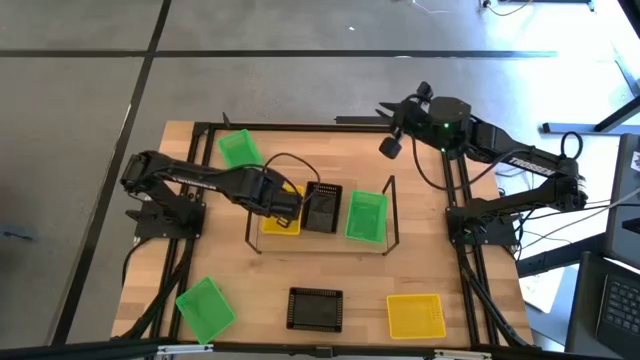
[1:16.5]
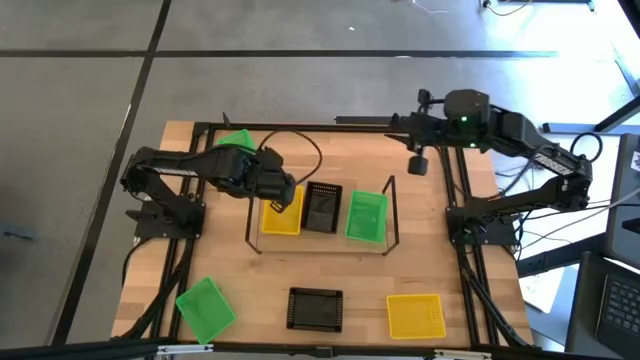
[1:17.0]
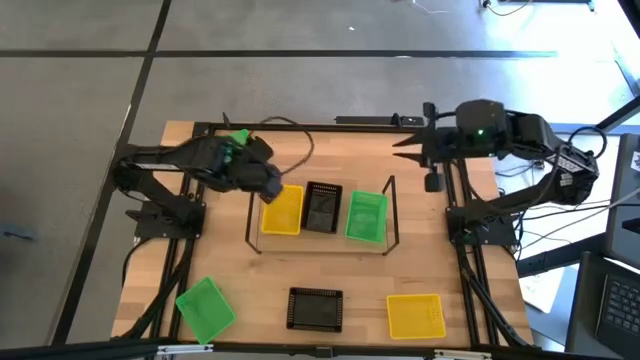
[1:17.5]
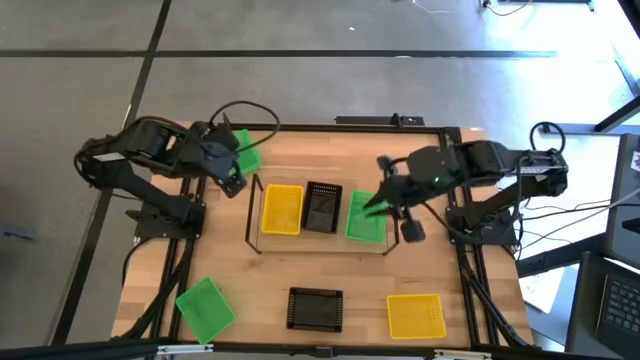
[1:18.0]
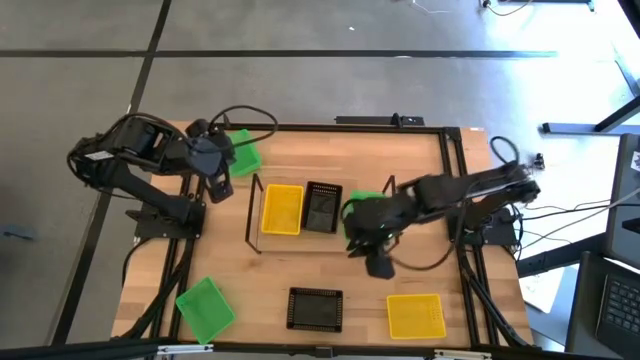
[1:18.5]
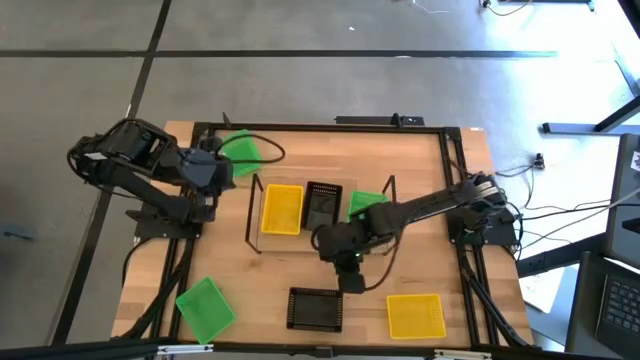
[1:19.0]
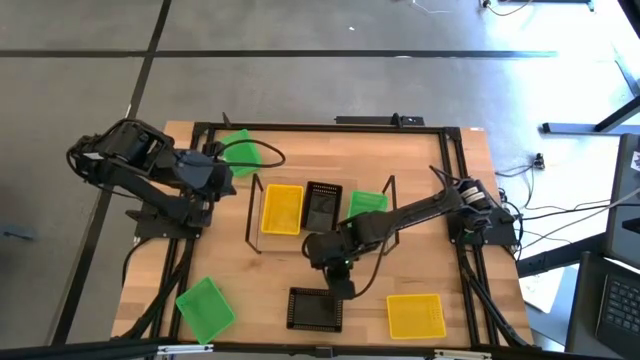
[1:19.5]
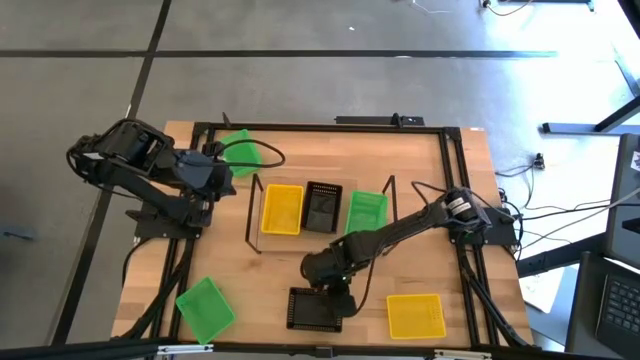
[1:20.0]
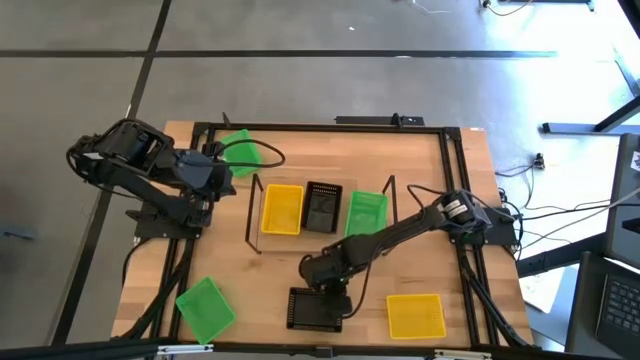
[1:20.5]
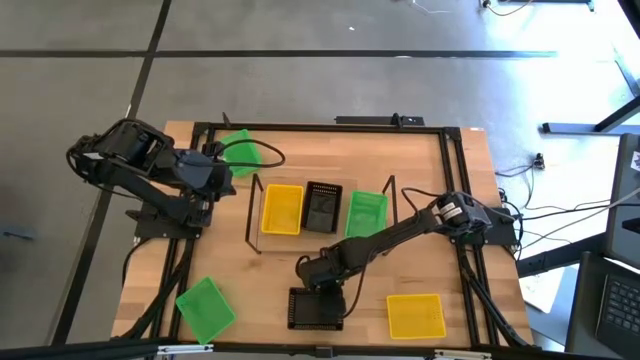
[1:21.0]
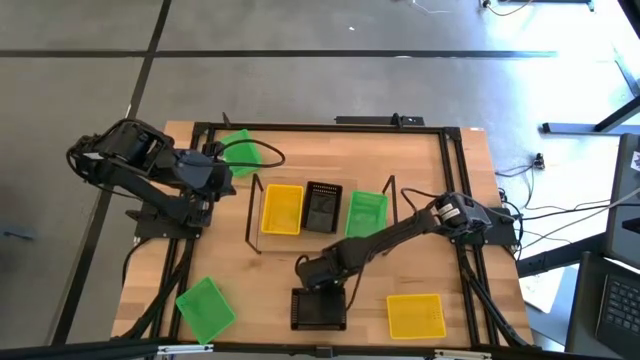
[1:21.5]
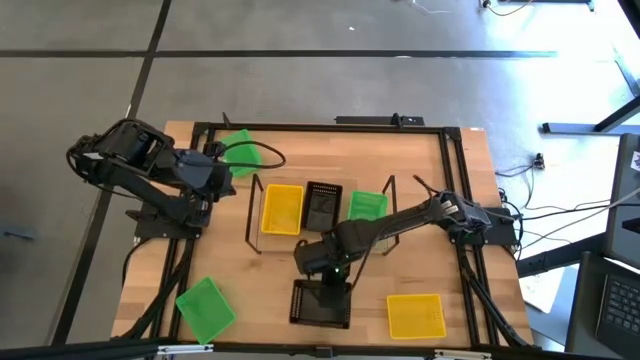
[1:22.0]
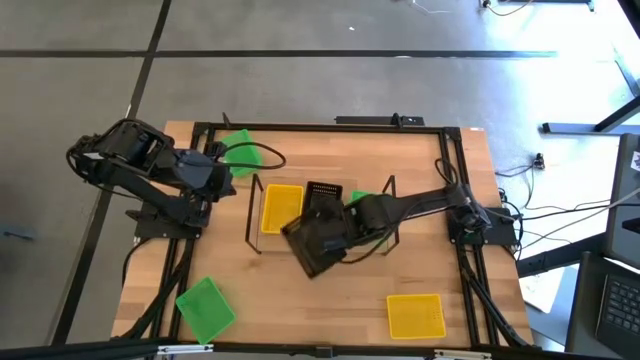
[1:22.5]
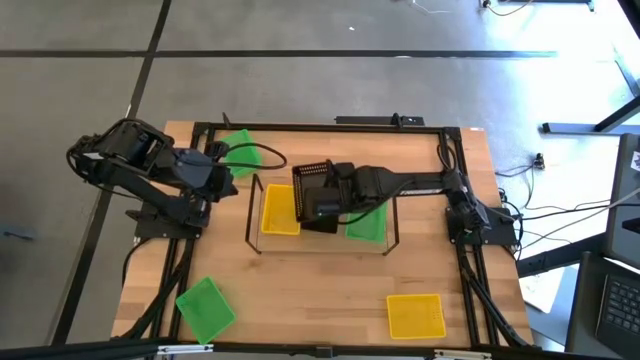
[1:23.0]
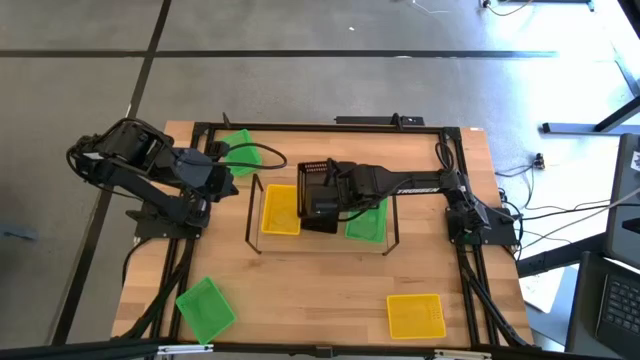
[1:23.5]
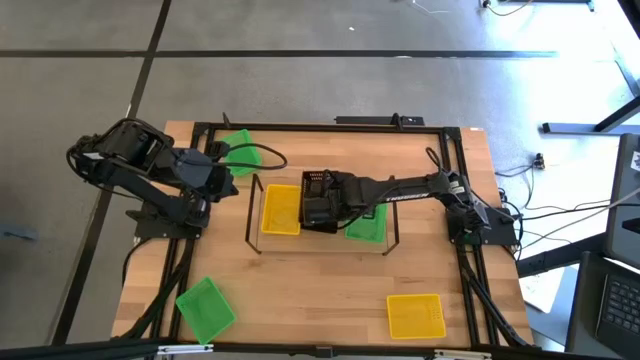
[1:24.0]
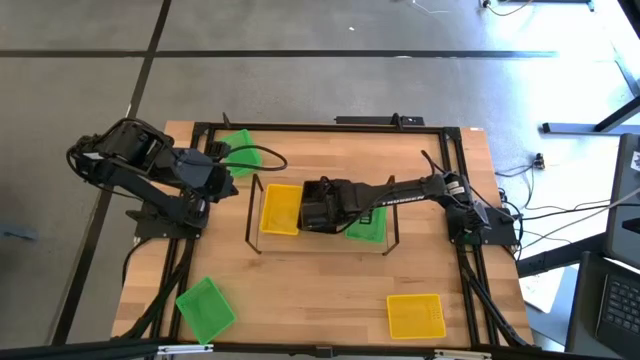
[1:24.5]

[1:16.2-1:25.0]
Task: Stack baskets on shelf by color
Stack the black bin on top of the black bin on the shelf

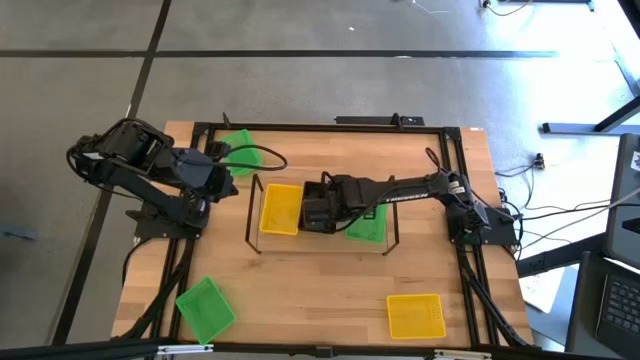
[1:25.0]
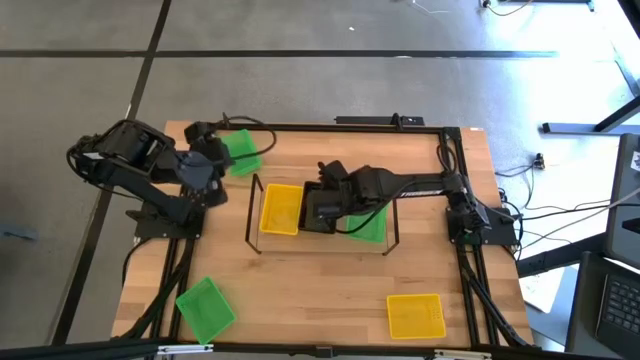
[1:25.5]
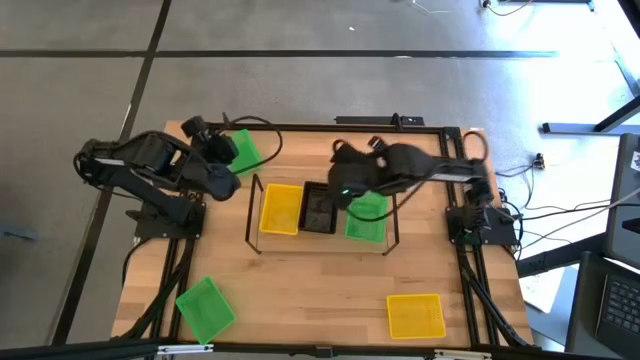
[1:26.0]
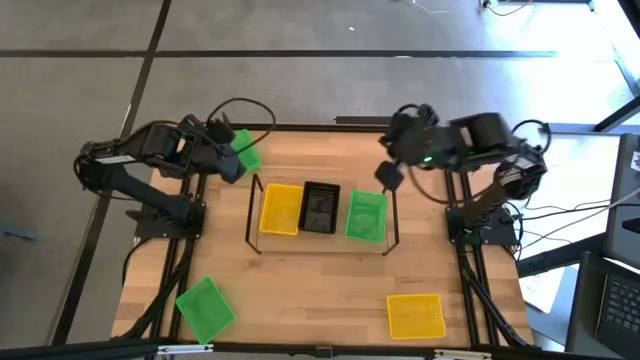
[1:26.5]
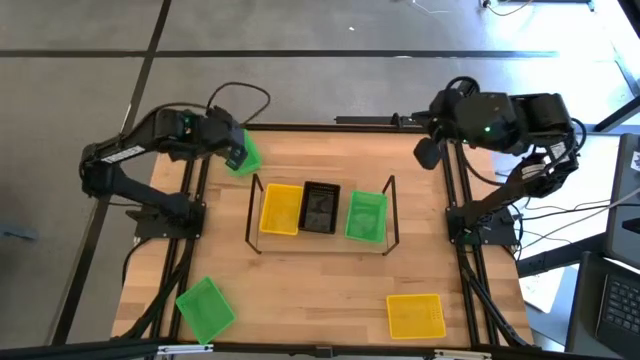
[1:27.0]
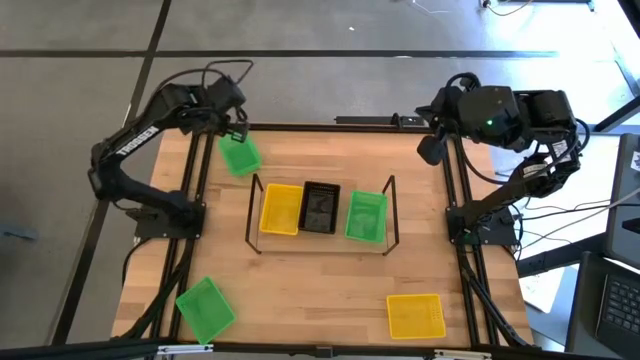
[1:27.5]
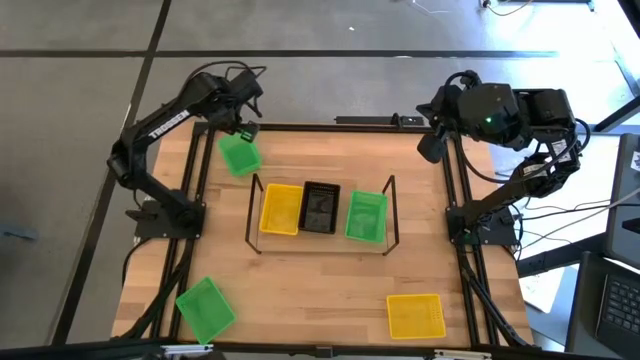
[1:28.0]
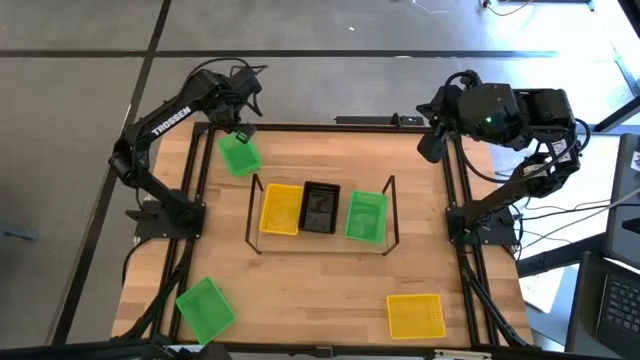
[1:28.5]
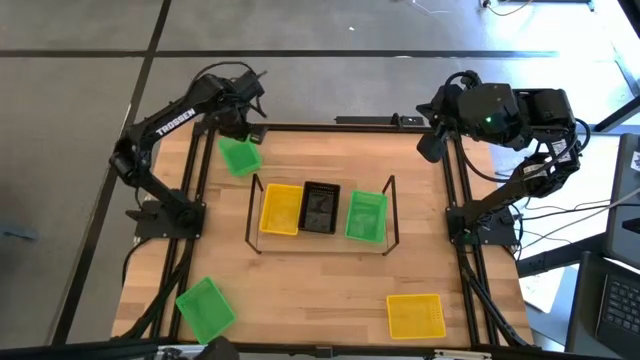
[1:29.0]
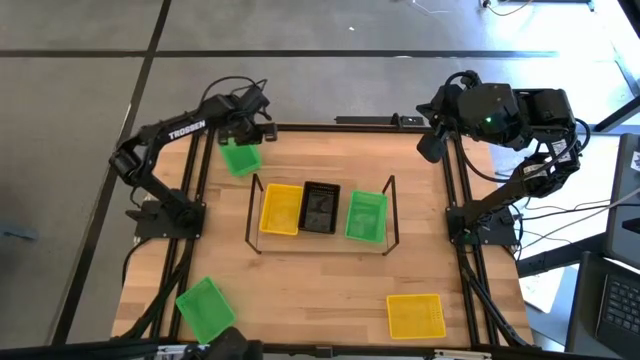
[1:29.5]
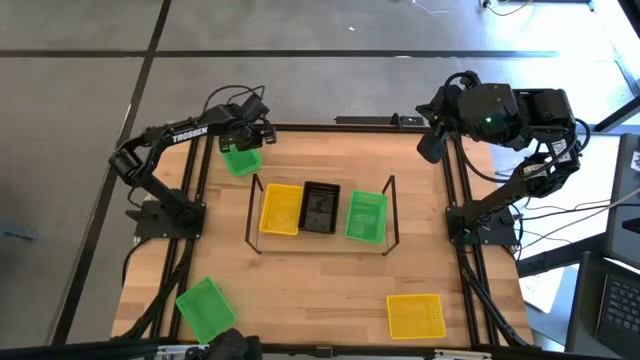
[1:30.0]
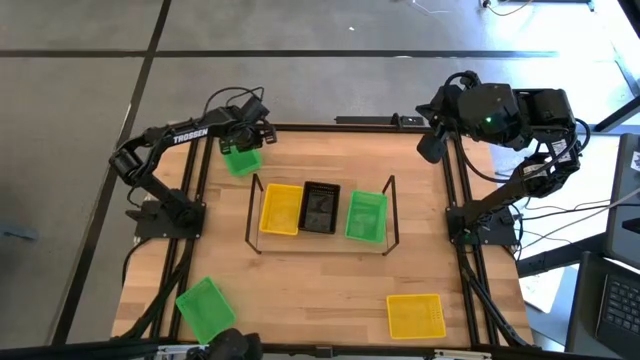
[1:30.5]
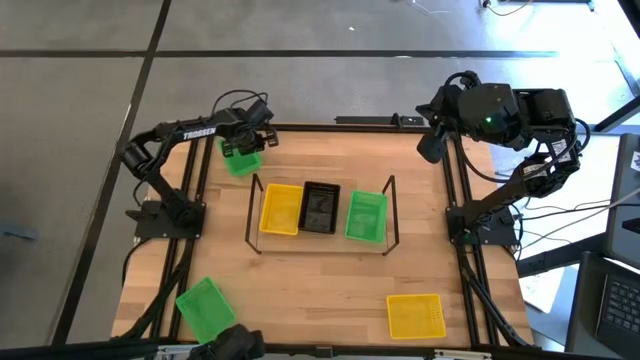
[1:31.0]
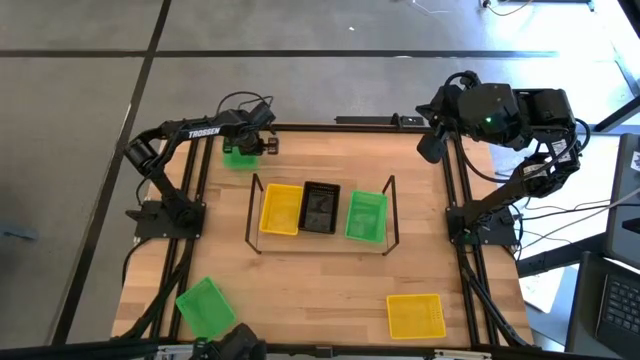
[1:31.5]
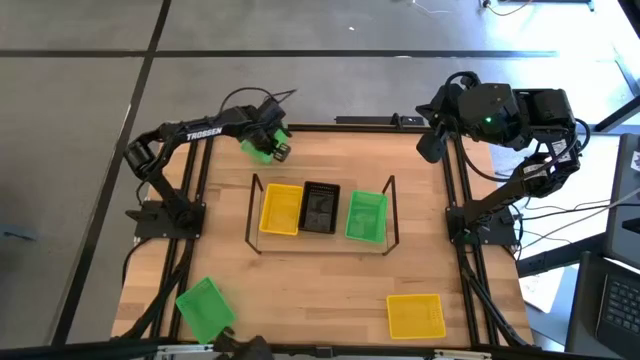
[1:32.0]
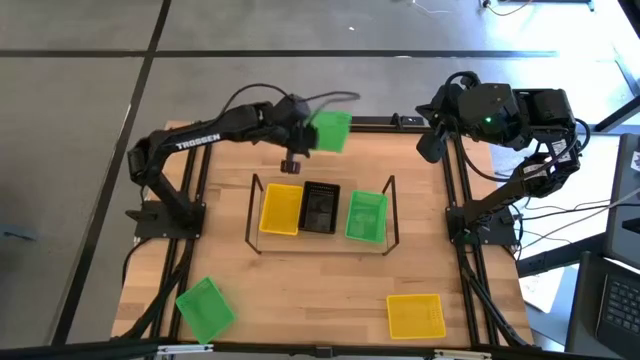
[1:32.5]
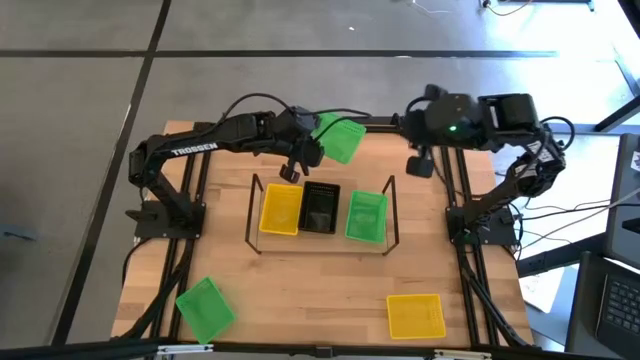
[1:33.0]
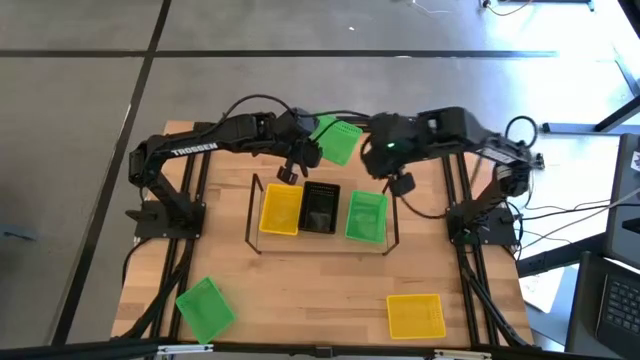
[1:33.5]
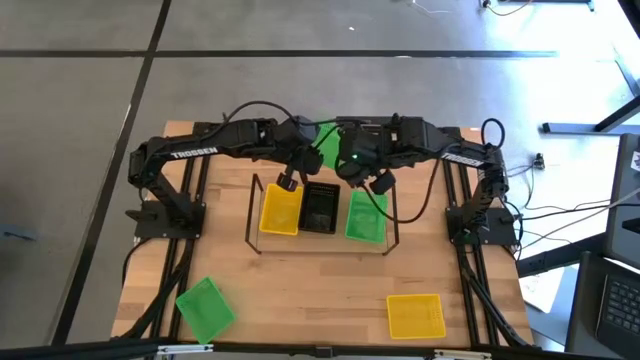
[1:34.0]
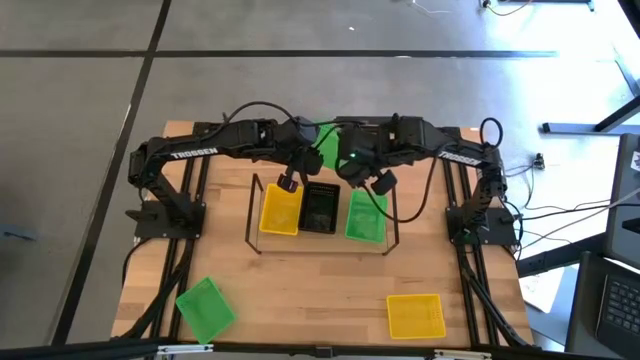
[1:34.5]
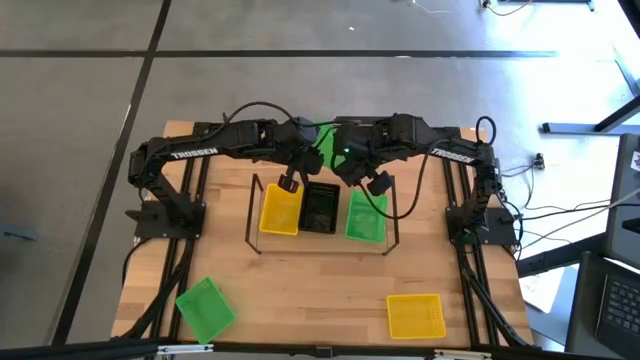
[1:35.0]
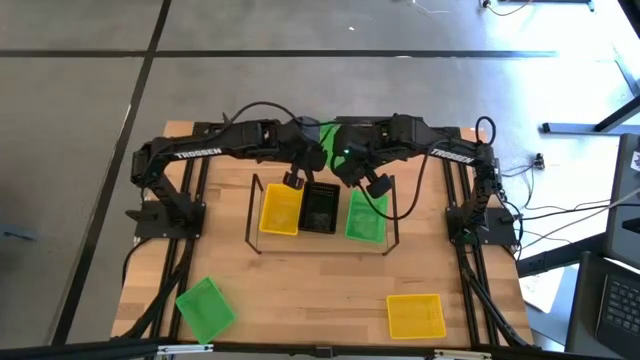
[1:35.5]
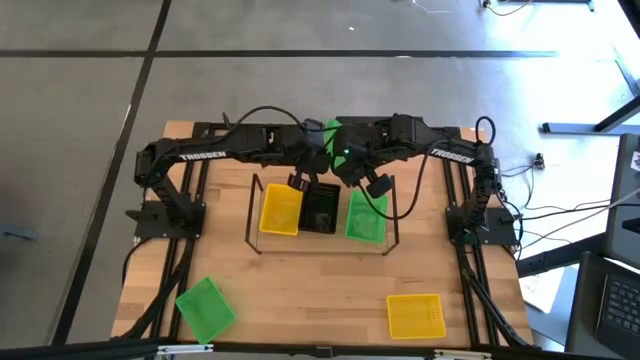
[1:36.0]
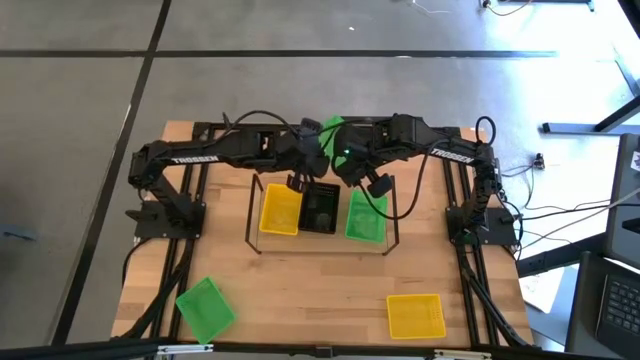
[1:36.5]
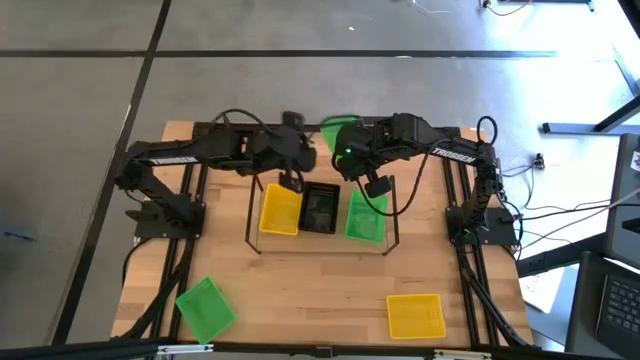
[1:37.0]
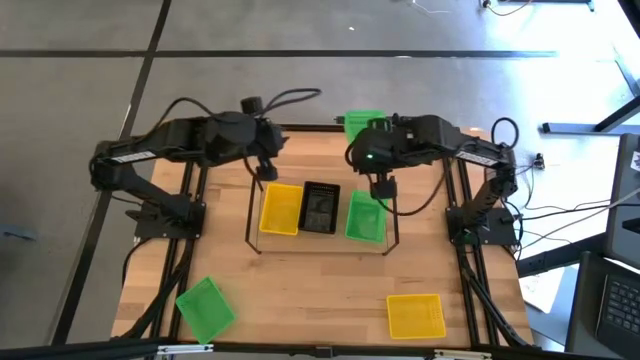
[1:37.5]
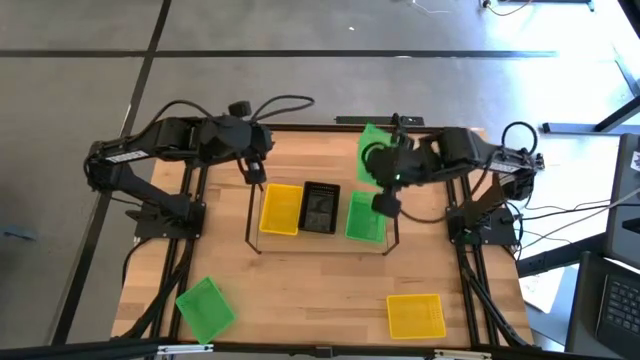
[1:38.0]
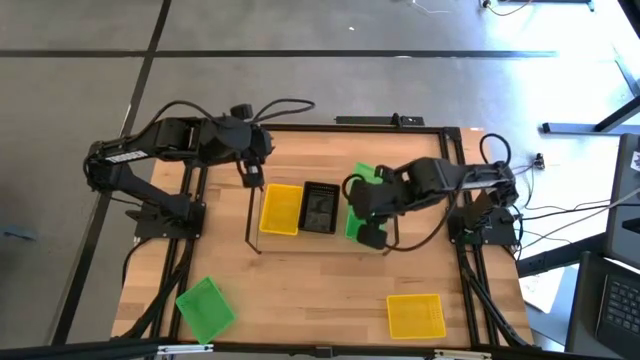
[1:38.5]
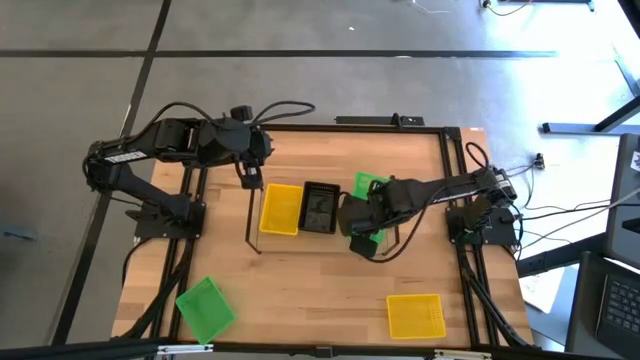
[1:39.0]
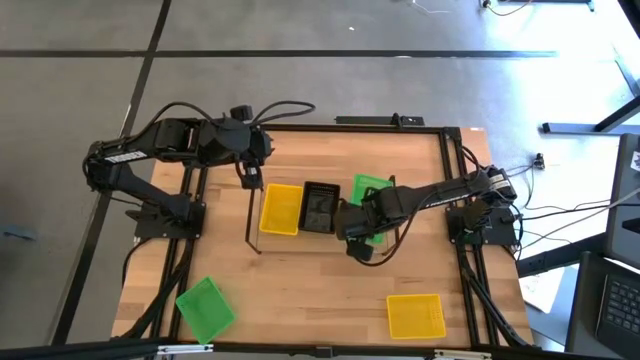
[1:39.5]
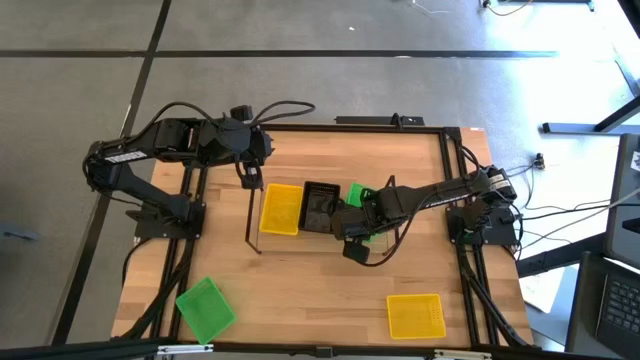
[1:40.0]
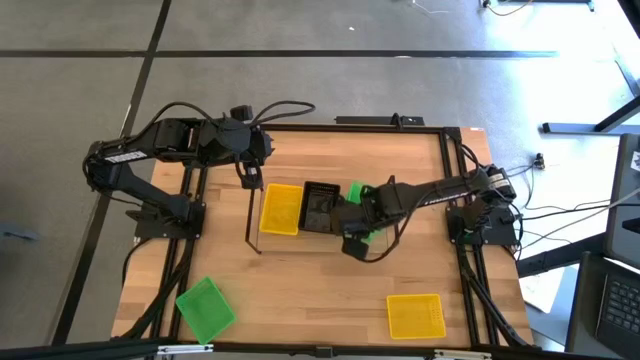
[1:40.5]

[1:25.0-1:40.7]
Stack the top green bin on top of the green bin on the shelf
